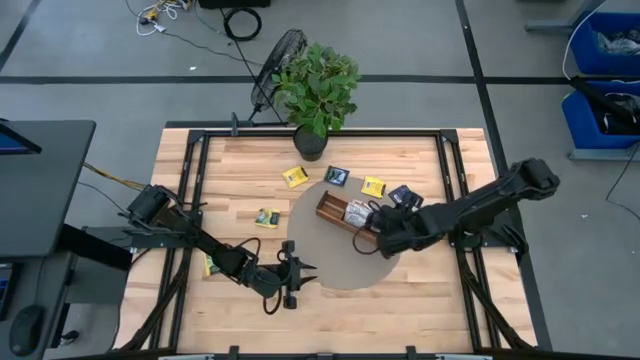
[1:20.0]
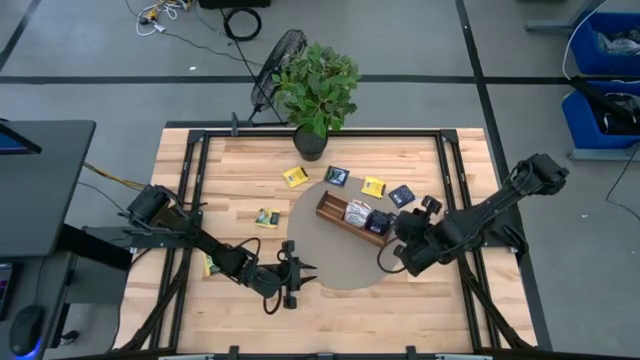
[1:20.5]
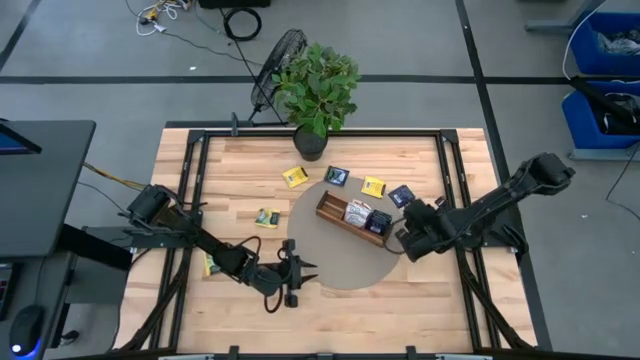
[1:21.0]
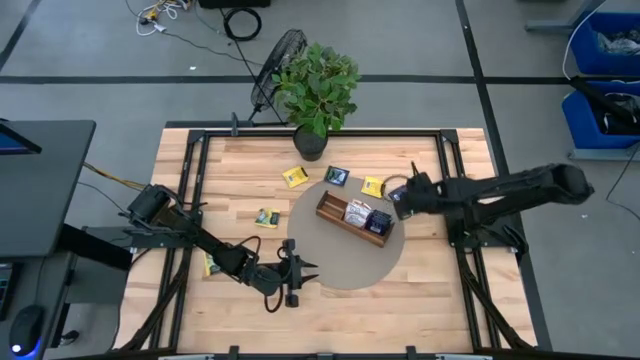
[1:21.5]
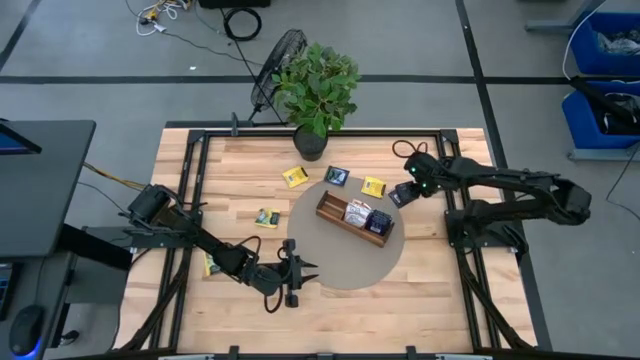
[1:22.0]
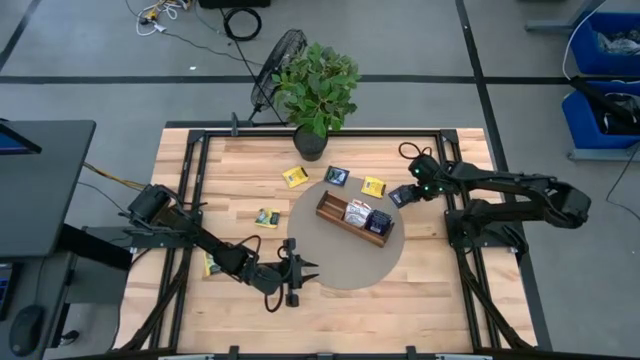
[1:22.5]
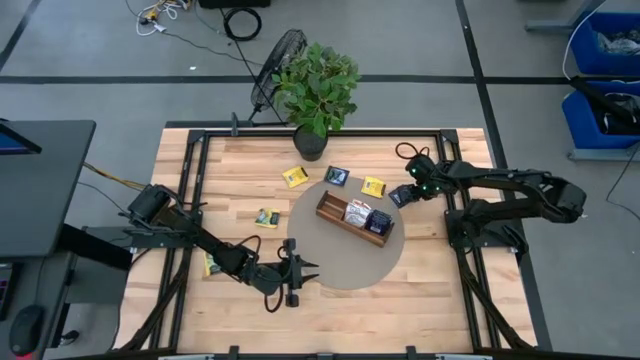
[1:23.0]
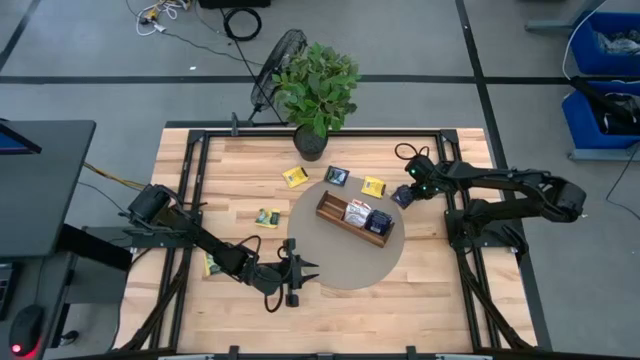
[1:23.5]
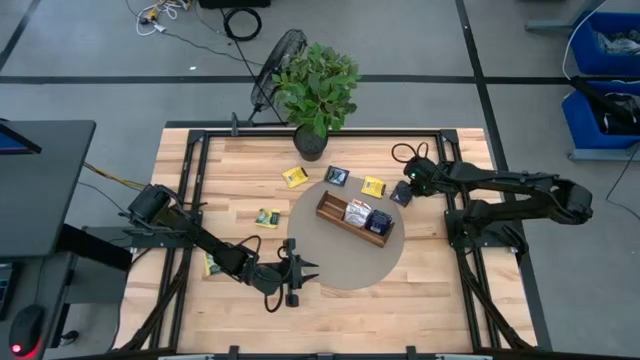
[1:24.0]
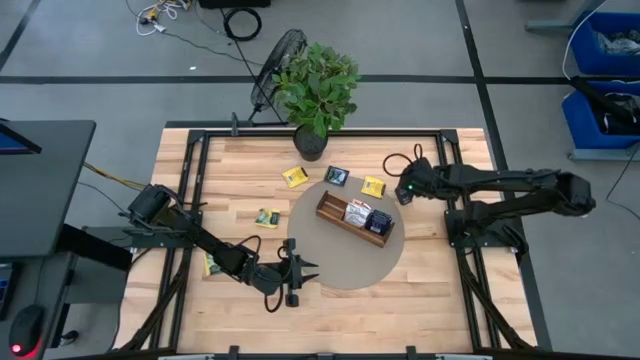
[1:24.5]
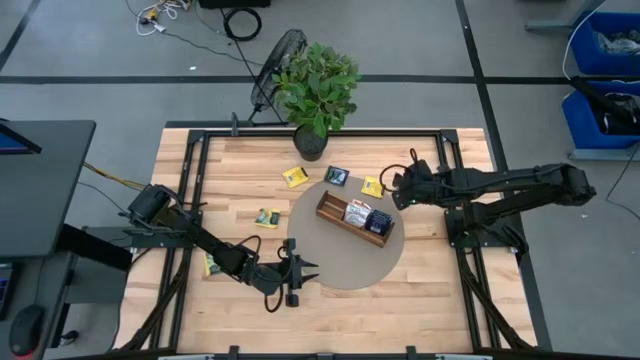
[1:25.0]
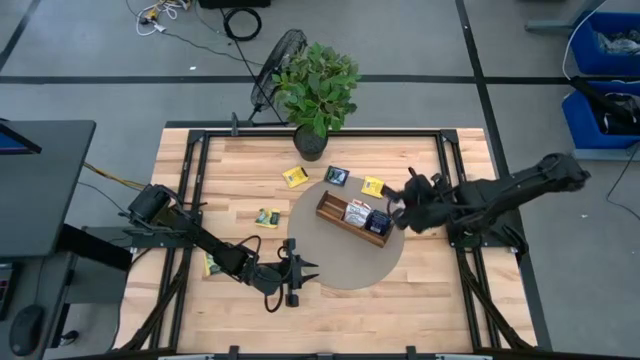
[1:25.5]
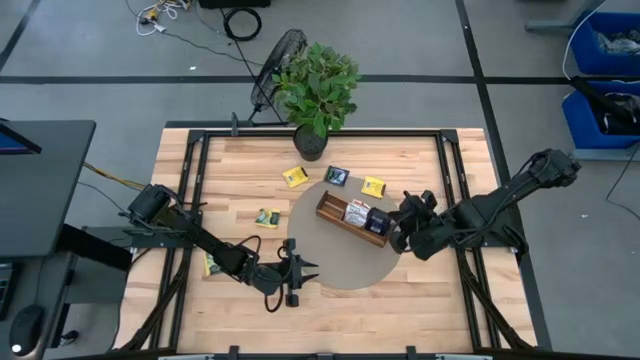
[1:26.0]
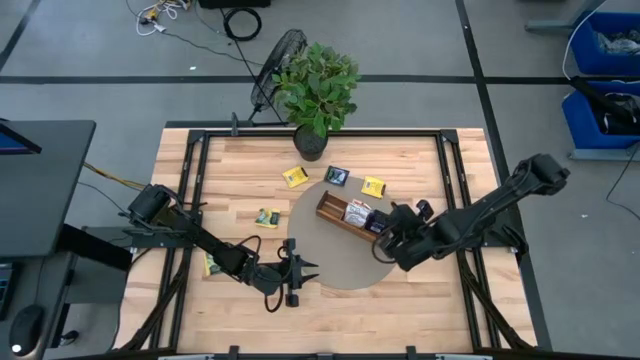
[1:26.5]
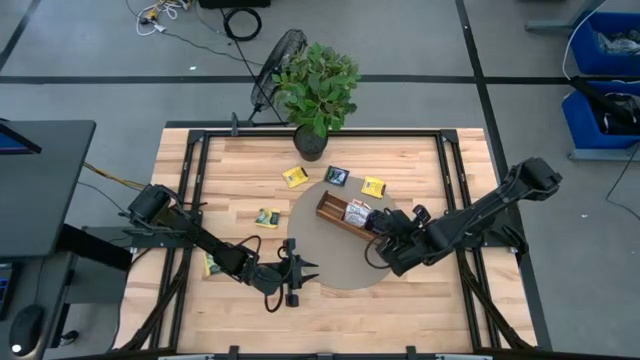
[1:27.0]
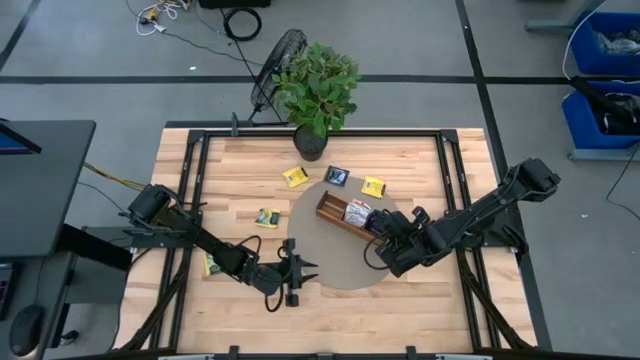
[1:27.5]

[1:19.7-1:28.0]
Task: Pick & Place Tea
Put the black tea bag into the right section of the wooden organizer

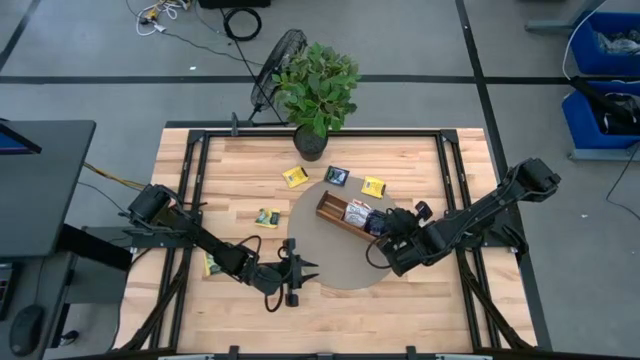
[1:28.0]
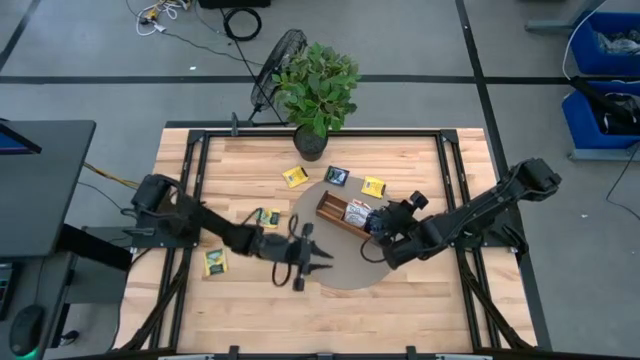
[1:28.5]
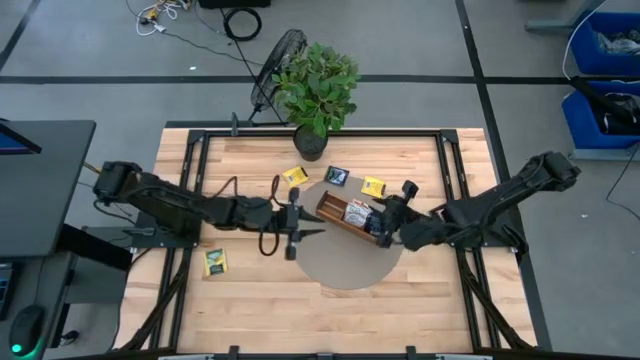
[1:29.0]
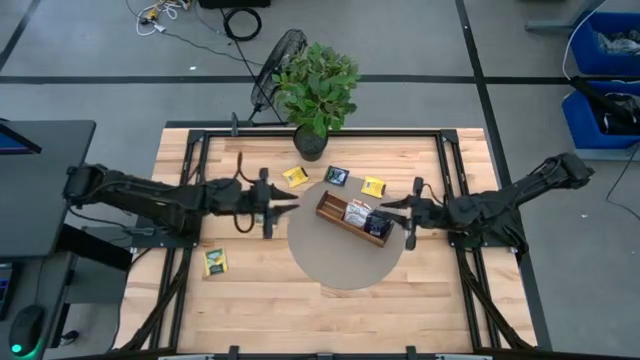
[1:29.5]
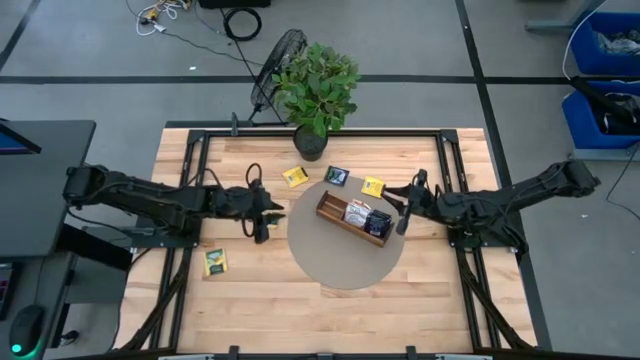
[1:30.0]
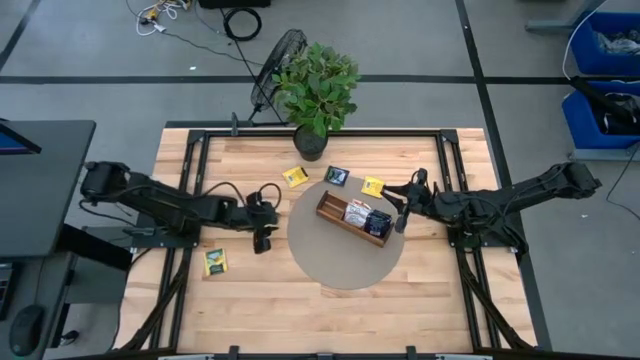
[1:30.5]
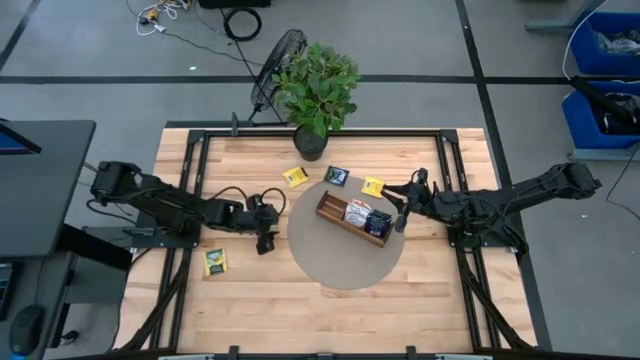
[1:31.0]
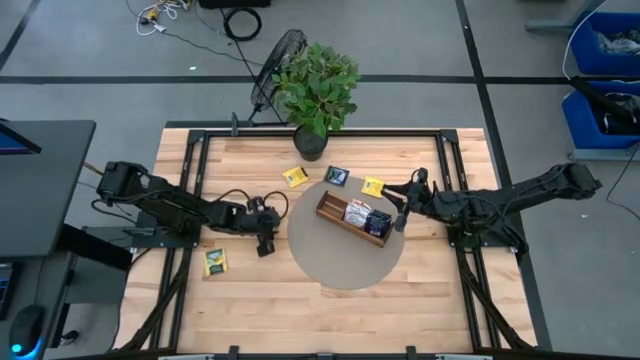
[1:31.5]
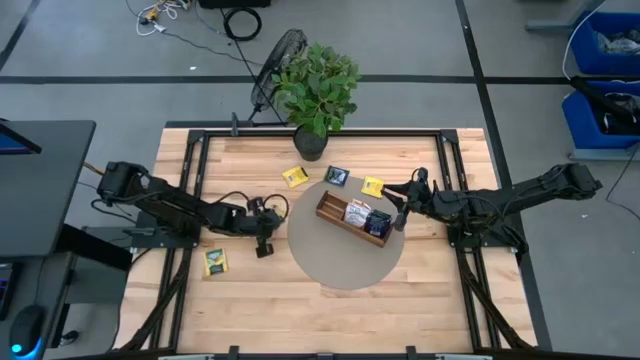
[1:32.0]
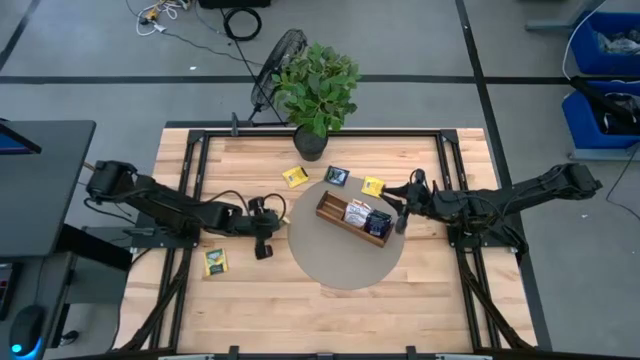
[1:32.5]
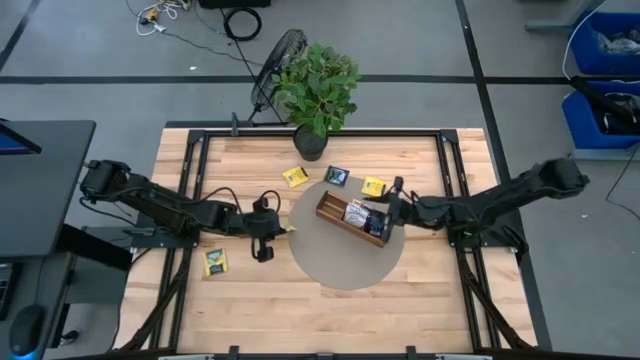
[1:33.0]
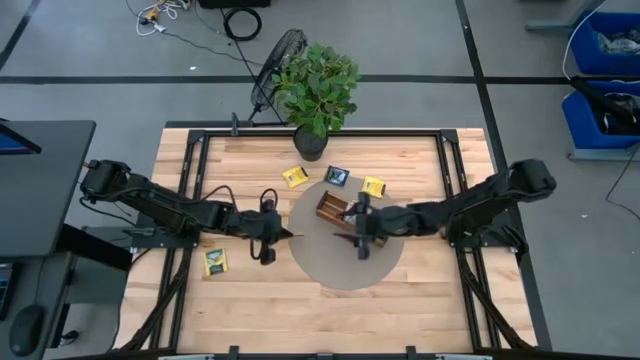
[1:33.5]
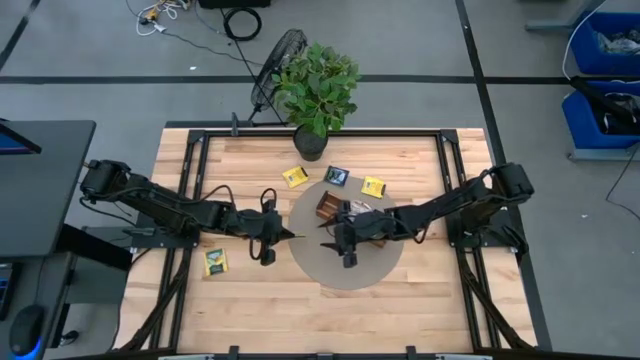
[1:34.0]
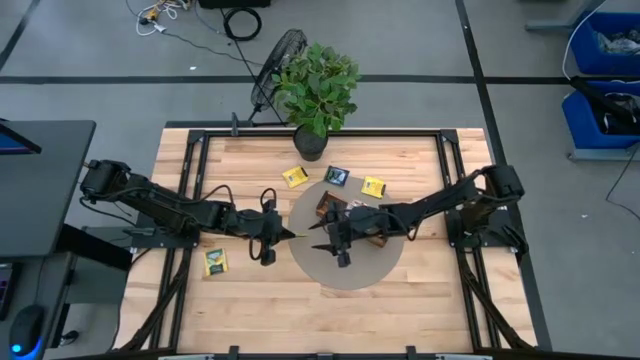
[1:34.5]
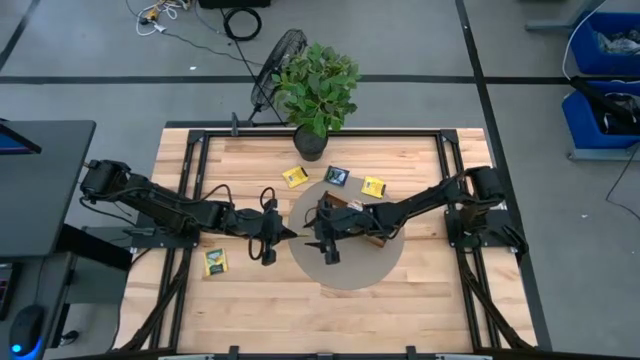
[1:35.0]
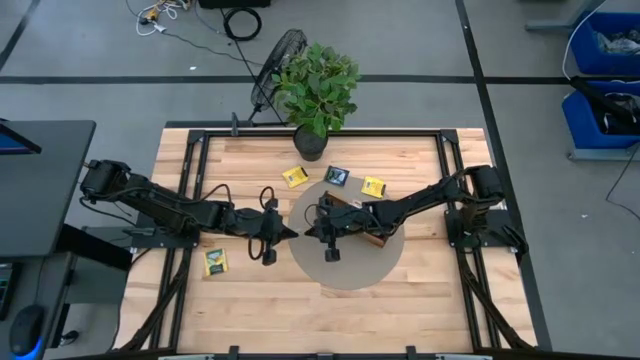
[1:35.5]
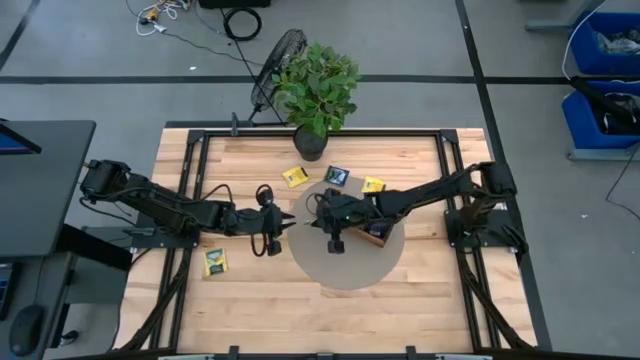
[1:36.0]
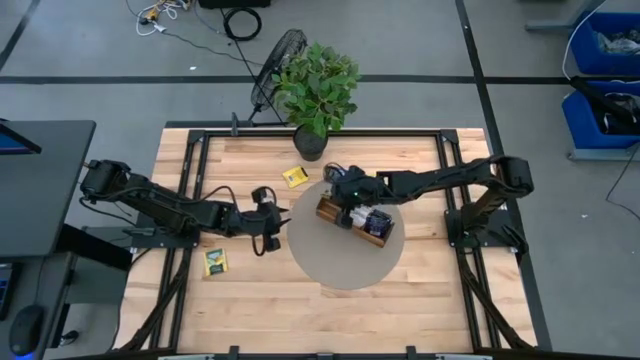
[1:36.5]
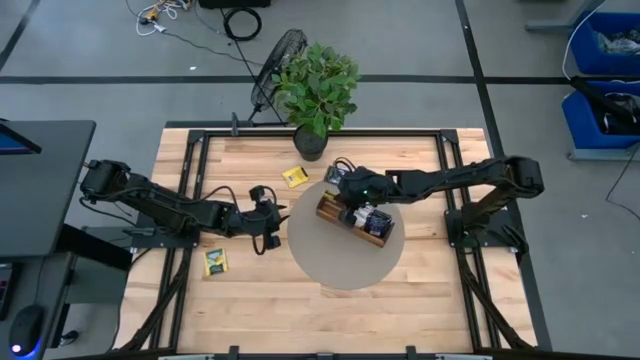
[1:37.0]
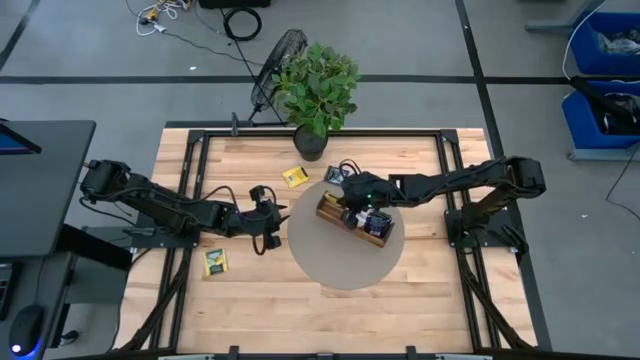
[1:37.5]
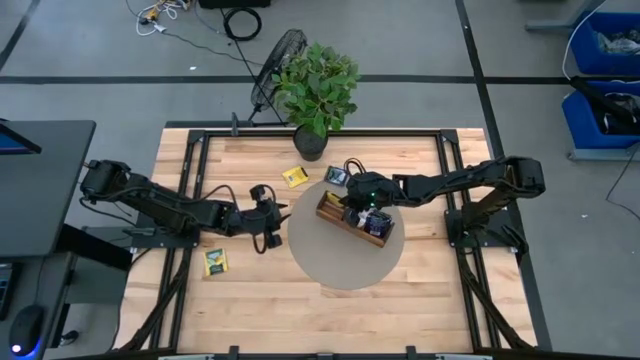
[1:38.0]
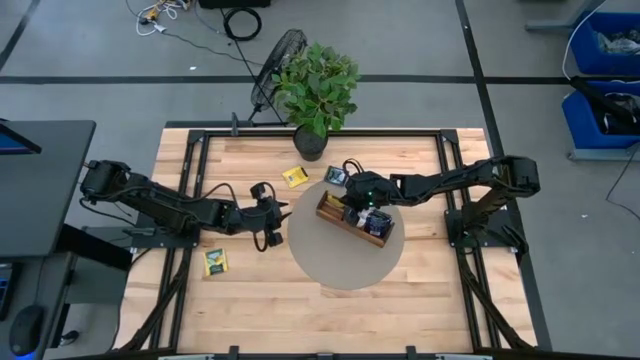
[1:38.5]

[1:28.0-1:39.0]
Put the yellow tea bag into the left section of the wooden organizer

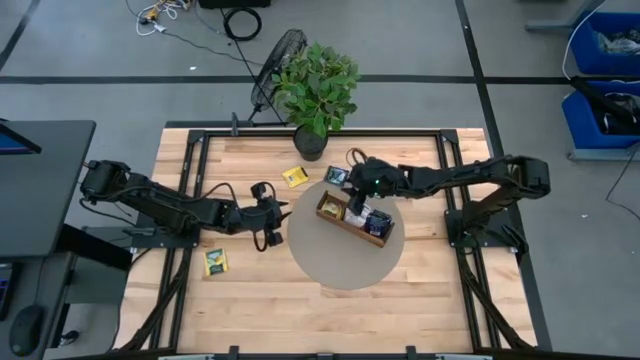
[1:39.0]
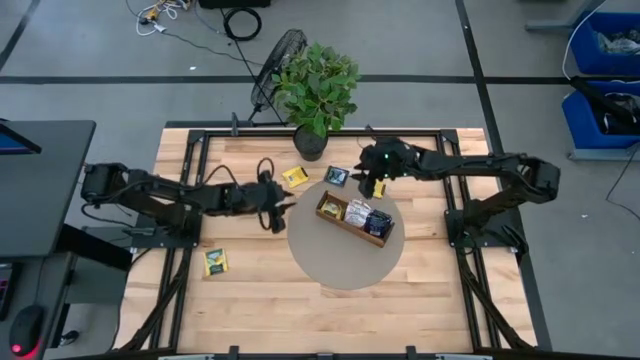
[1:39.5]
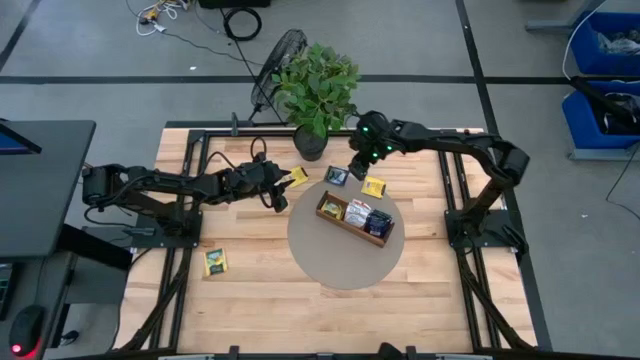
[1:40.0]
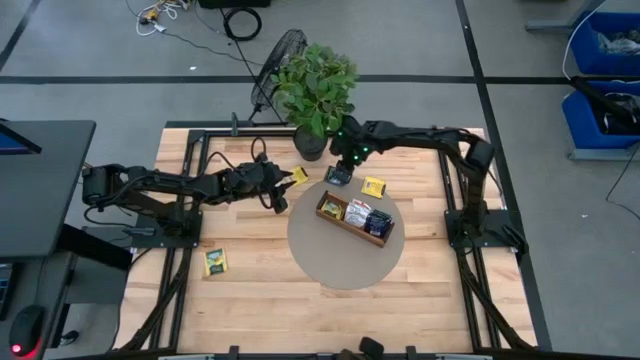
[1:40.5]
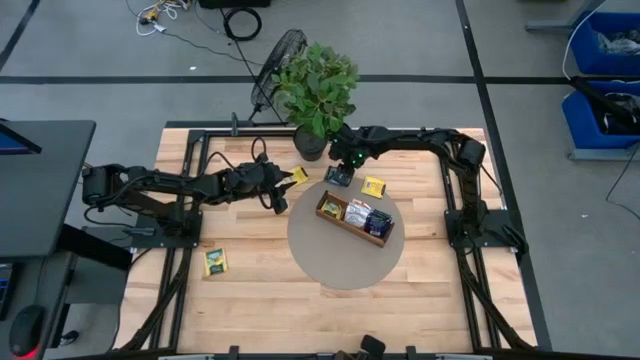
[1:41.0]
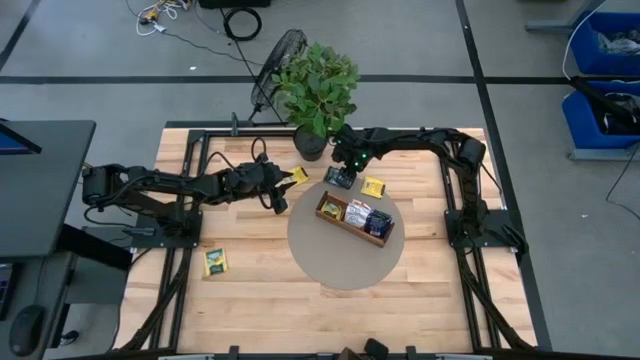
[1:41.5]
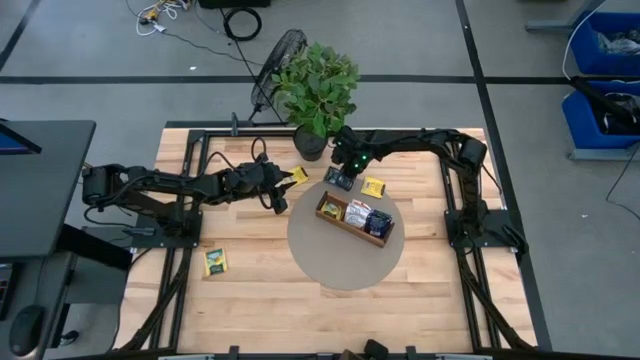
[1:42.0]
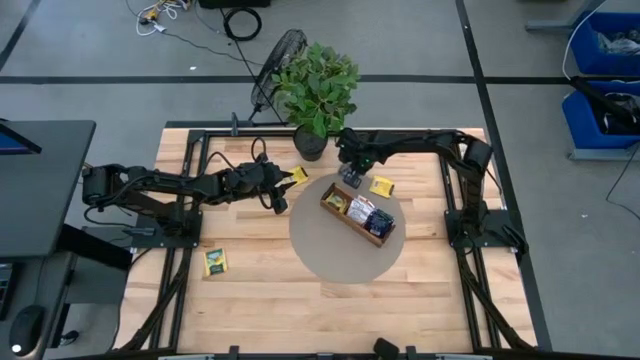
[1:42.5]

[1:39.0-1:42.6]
Put the black tea bag into the right section of the wooden organizer
